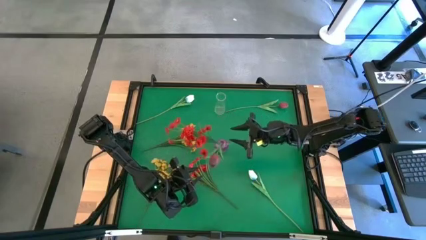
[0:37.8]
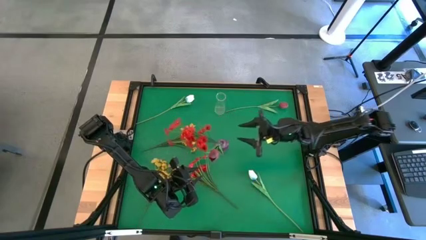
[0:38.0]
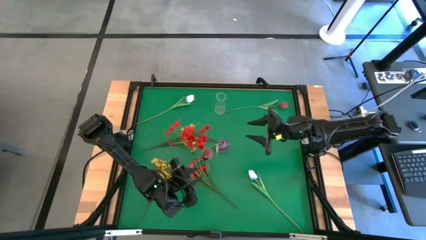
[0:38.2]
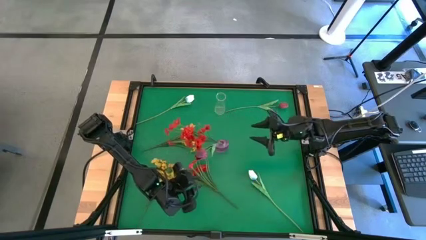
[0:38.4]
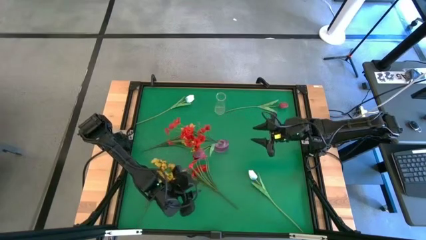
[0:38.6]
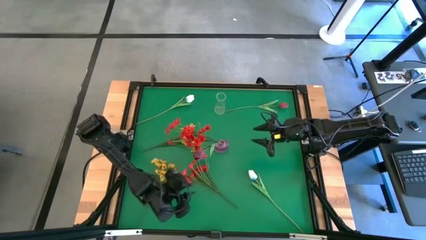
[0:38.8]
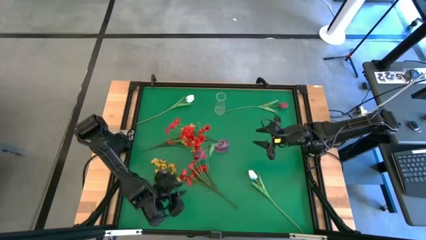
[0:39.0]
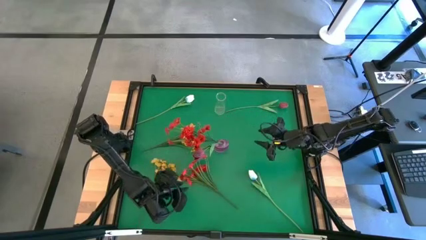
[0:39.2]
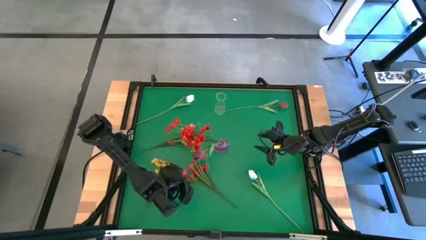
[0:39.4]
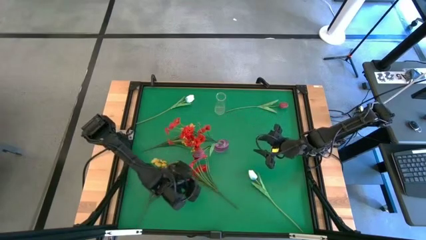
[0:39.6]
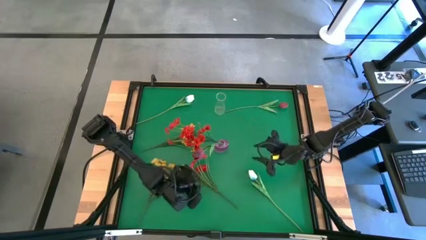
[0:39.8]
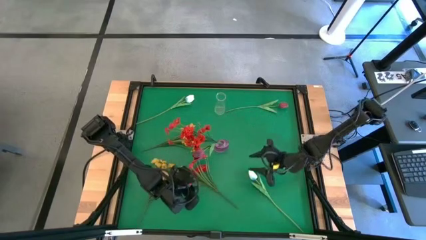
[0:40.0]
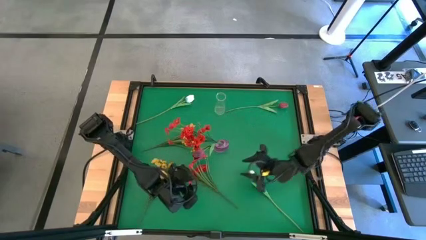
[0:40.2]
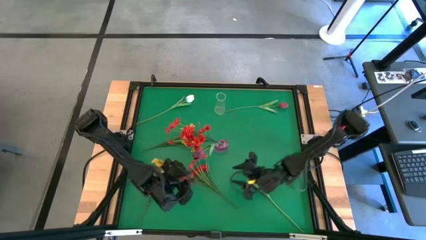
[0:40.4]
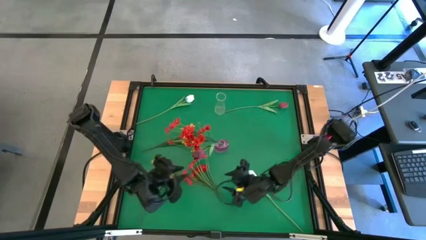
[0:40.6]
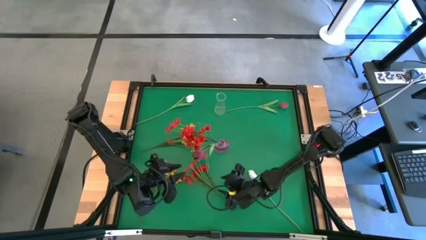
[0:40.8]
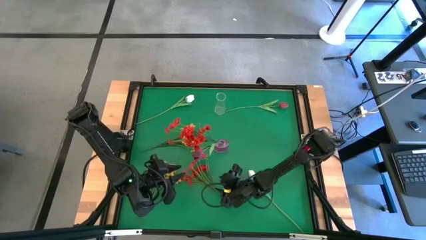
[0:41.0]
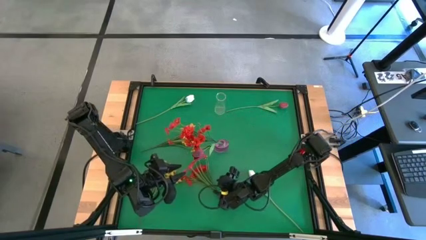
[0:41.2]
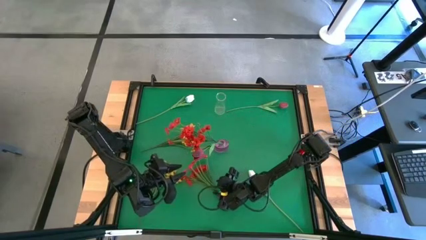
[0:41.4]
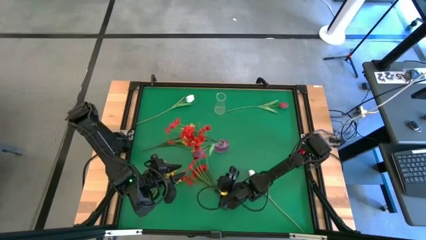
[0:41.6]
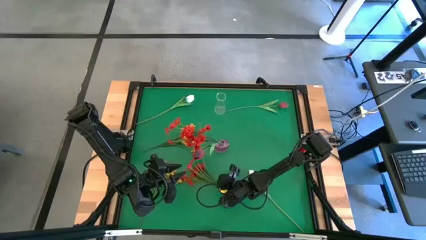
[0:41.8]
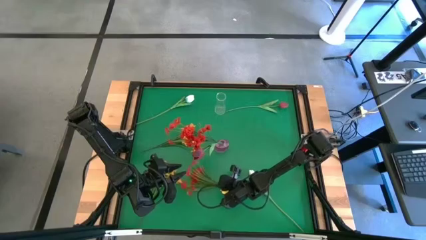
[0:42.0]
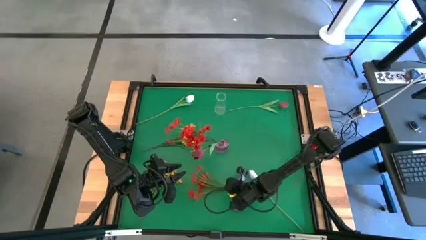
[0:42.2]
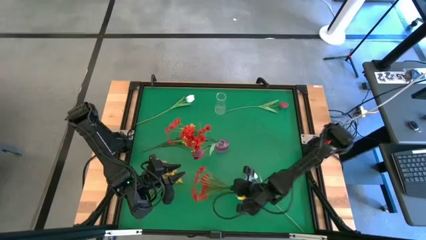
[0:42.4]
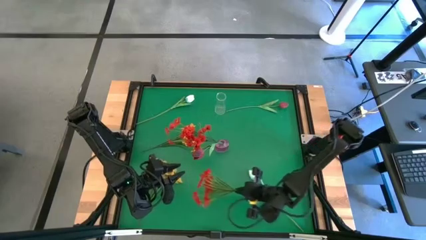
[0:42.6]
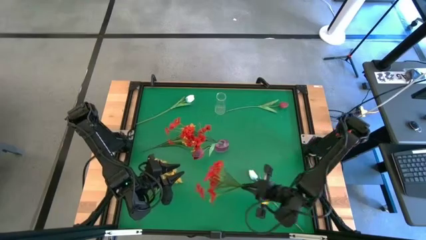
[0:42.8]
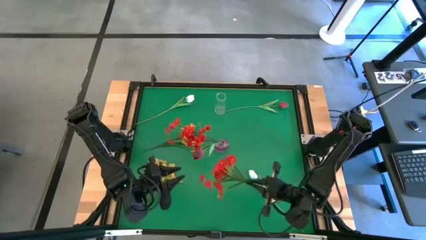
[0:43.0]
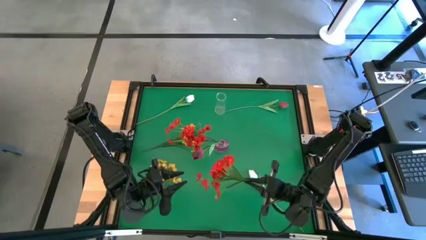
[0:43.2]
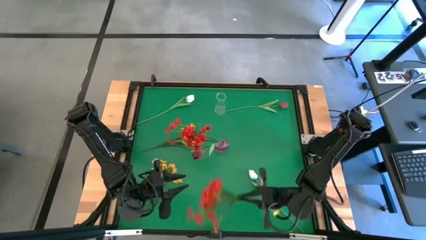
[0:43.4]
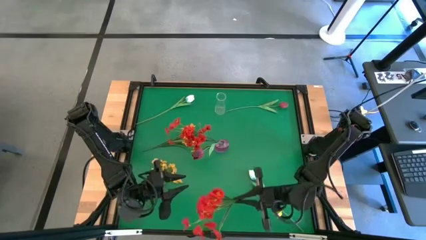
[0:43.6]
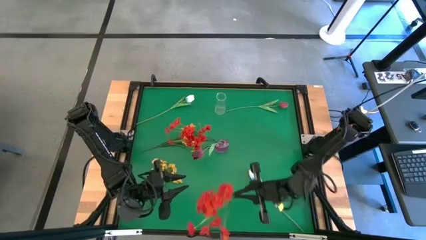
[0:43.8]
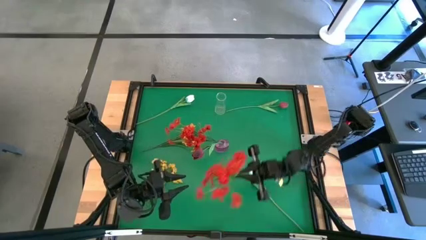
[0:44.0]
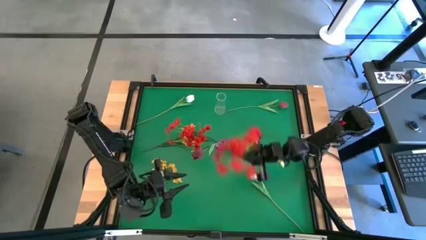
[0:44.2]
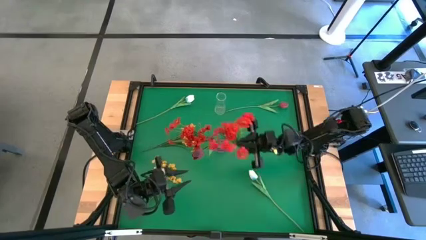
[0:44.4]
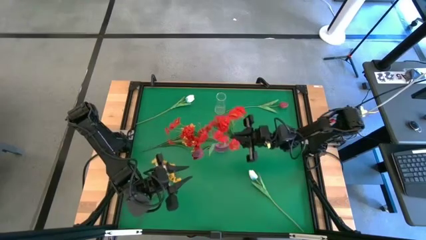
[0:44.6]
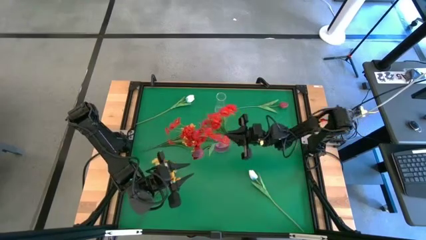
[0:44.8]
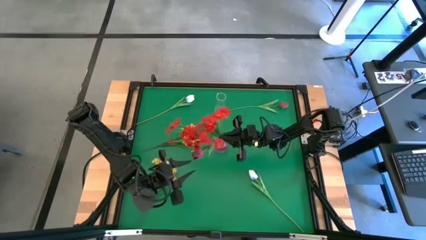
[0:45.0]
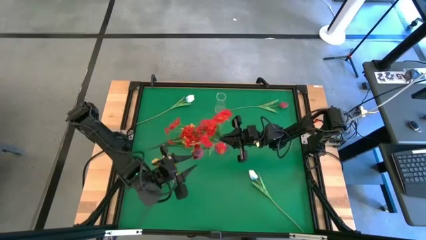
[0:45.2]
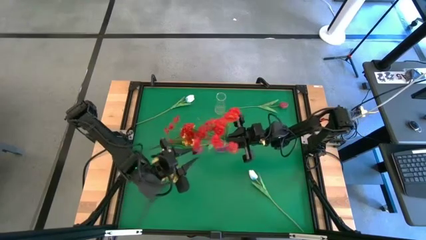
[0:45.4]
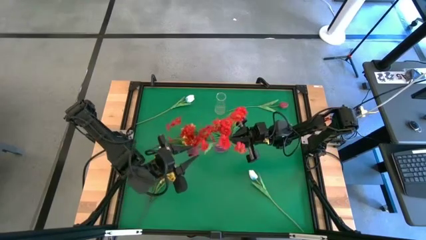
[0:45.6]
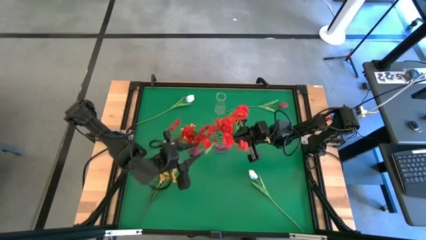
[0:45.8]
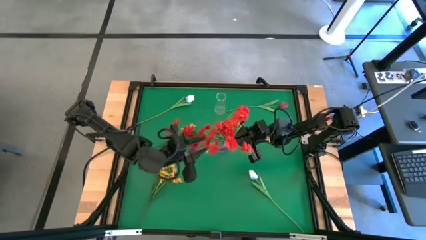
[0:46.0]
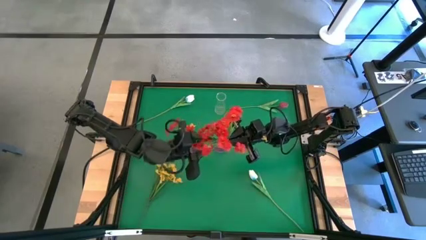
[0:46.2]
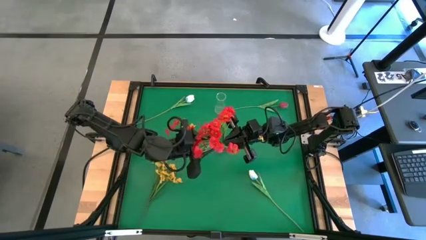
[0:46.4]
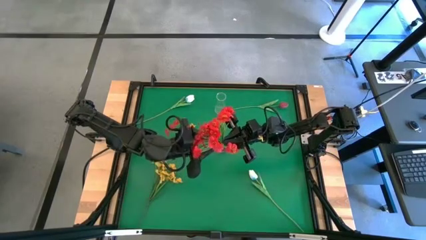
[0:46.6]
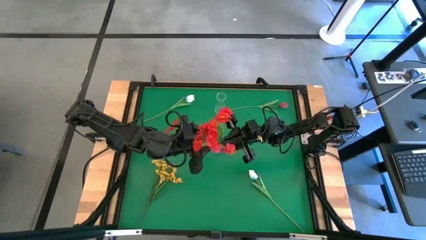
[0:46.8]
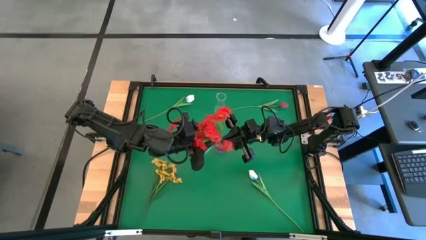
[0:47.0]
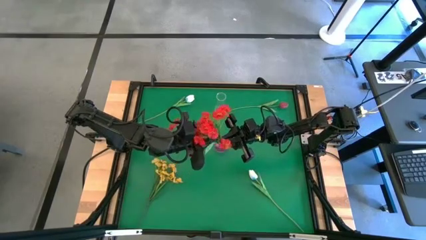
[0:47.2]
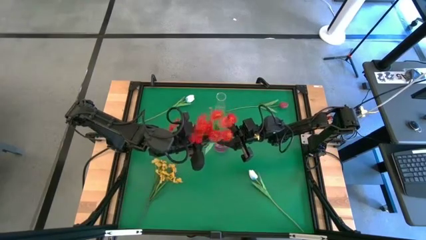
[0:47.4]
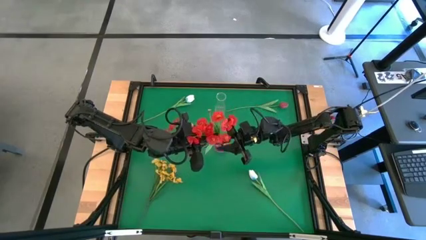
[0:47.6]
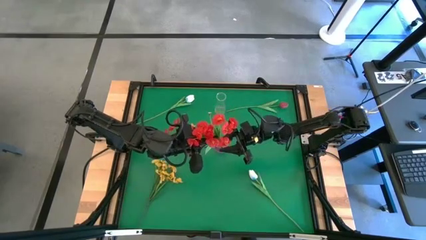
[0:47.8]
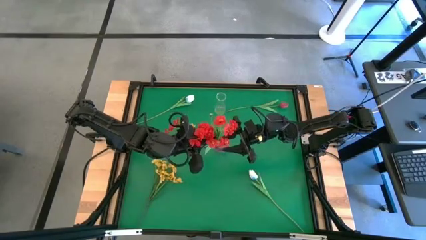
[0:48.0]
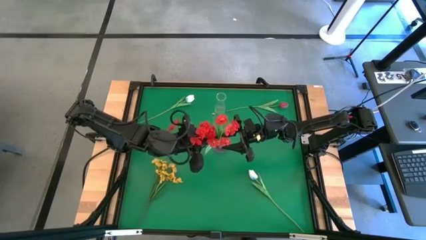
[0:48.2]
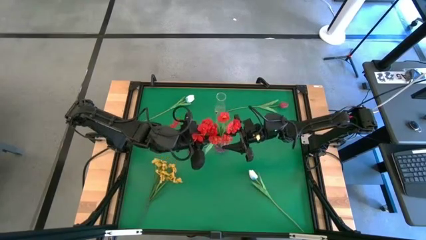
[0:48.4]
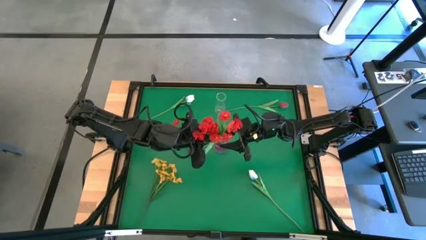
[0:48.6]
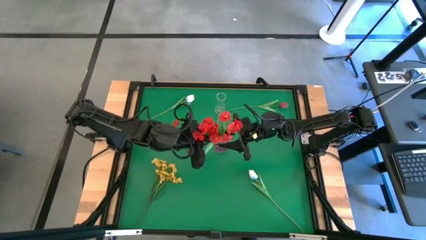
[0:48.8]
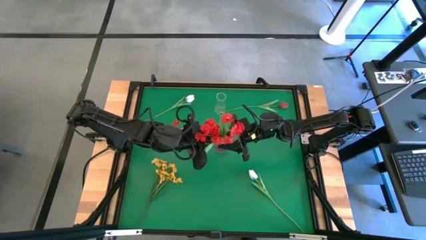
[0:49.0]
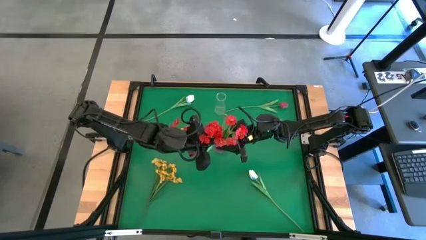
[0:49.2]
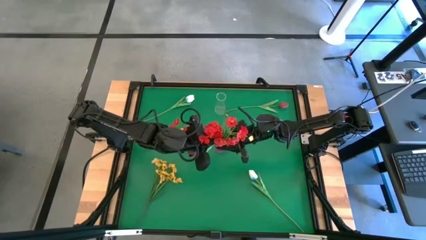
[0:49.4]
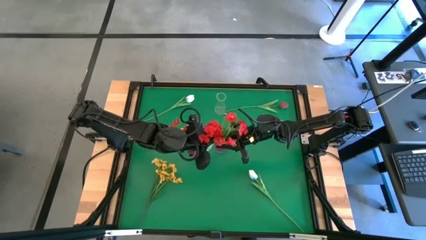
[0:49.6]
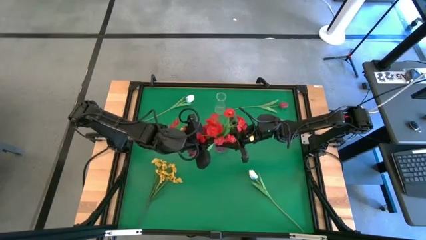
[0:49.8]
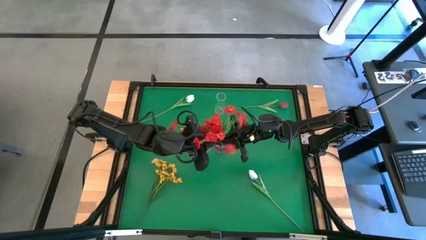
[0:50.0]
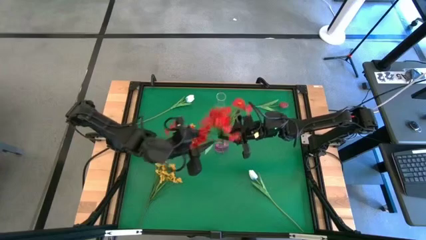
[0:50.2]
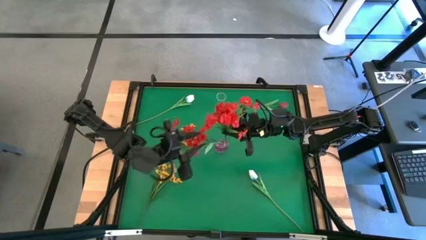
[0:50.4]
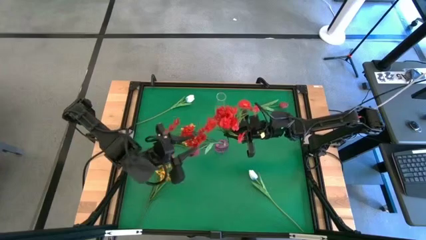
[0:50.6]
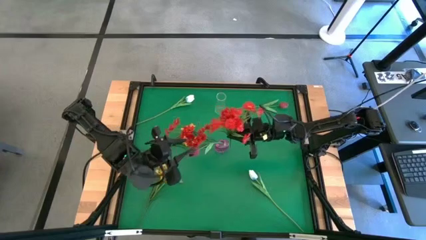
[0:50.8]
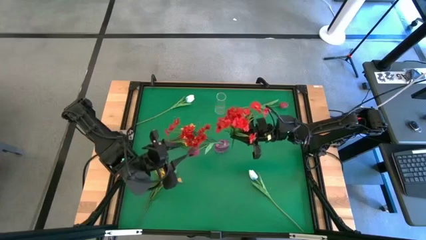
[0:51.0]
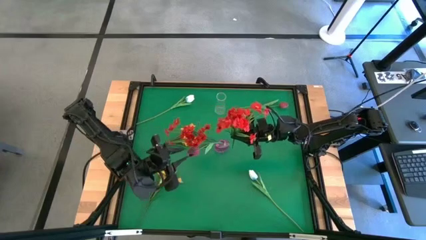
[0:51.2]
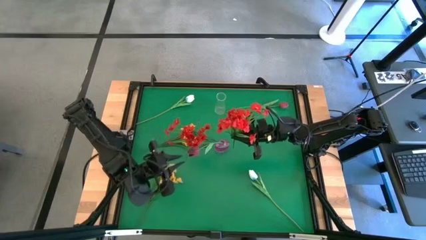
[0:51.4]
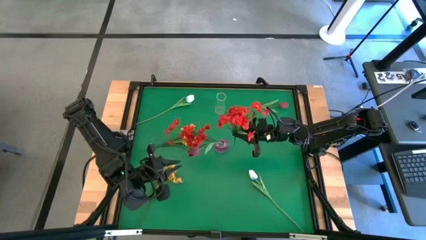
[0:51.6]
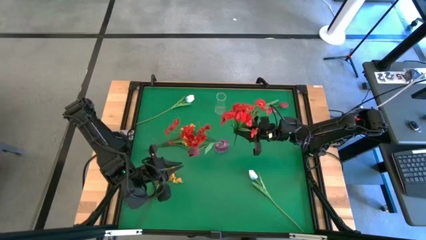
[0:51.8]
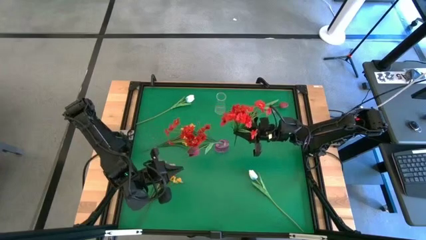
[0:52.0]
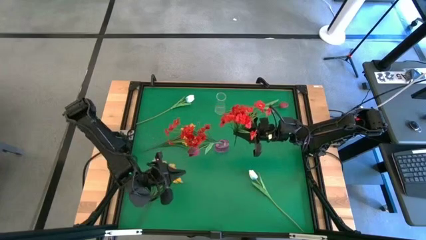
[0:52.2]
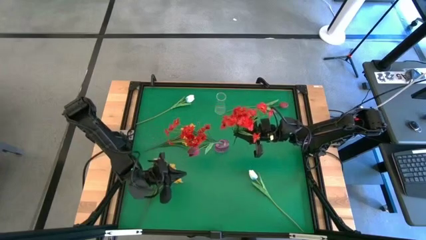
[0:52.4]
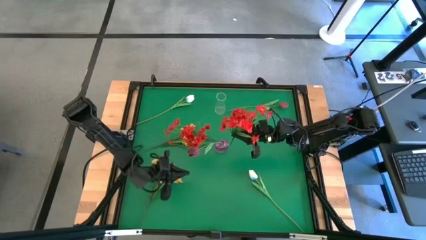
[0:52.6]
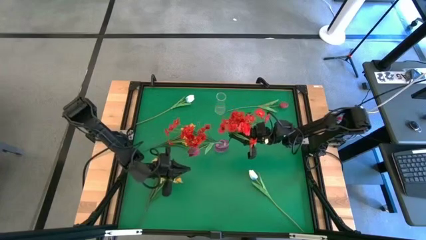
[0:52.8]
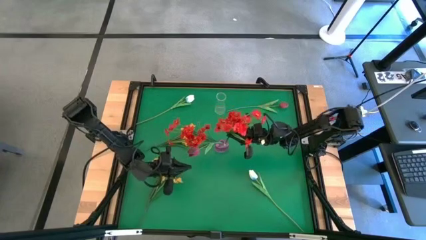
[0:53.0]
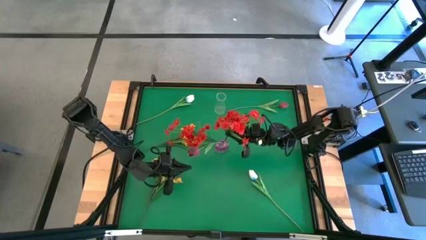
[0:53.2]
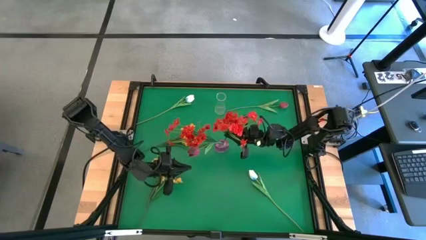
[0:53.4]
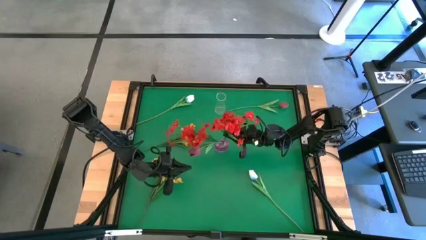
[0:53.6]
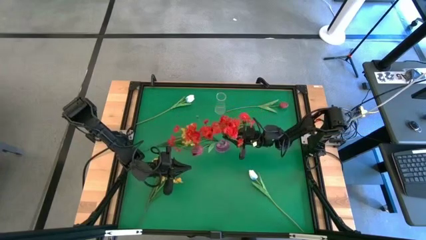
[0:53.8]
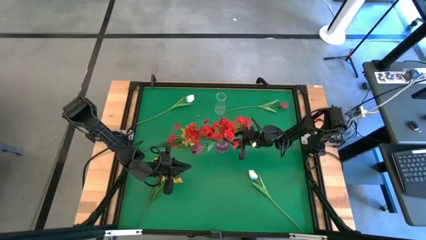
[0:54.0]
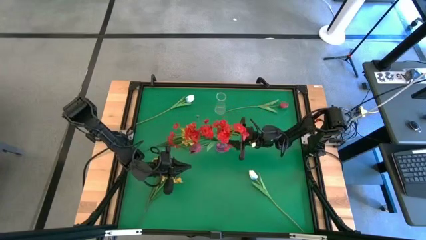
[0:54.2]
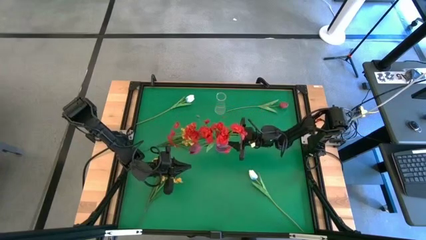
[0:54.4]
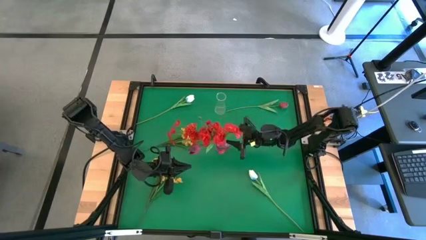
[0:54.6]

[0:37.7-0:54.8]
Task: Sort flowers into vase by color
Put the red flowers into the pink vase
